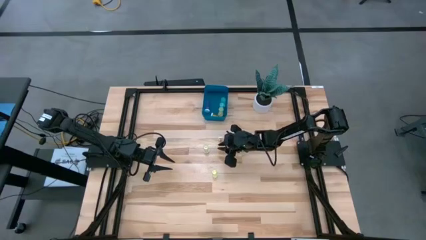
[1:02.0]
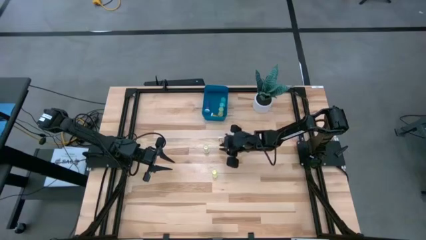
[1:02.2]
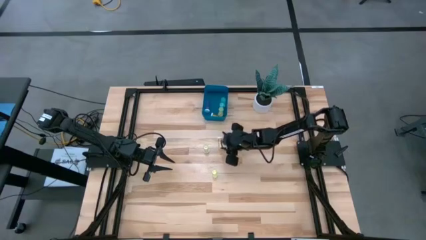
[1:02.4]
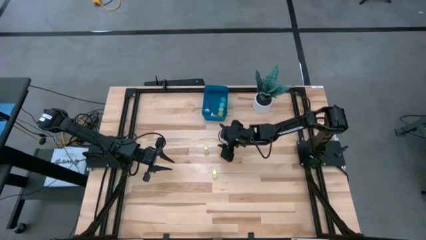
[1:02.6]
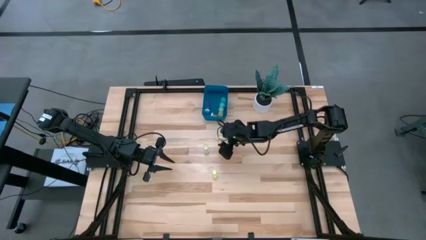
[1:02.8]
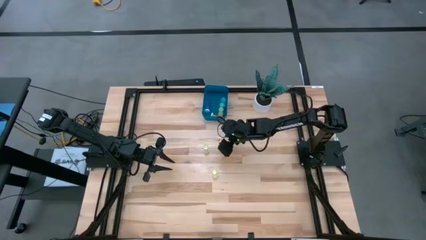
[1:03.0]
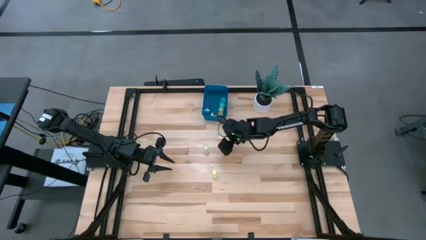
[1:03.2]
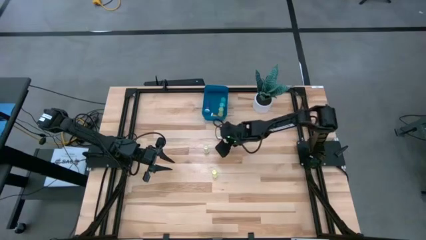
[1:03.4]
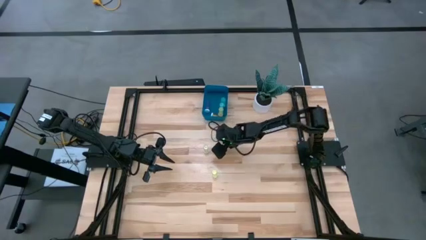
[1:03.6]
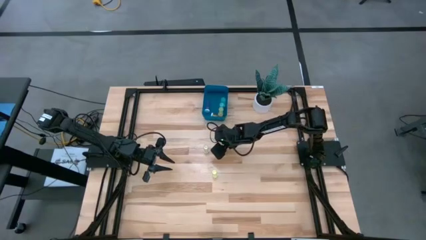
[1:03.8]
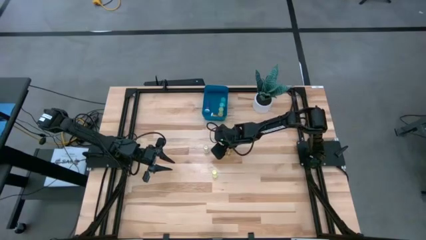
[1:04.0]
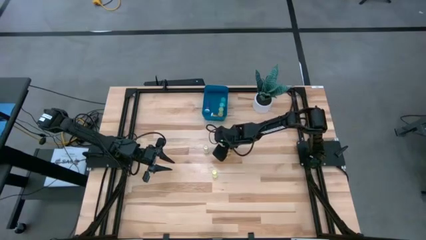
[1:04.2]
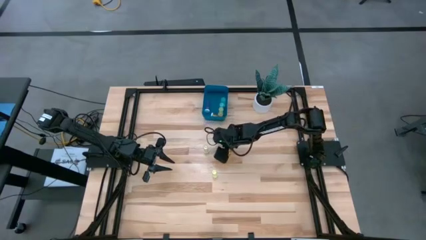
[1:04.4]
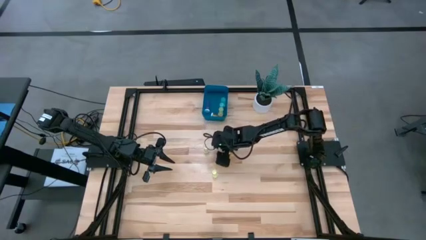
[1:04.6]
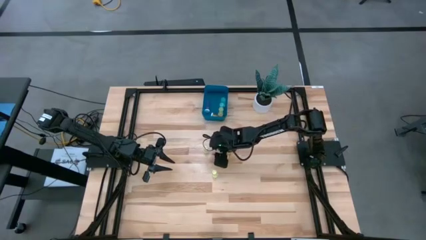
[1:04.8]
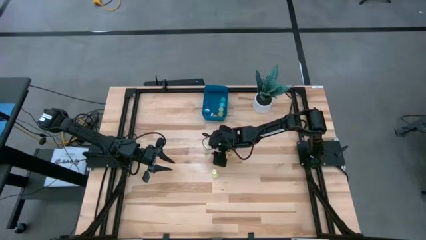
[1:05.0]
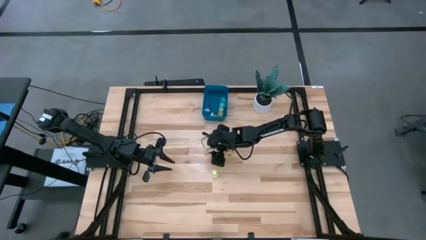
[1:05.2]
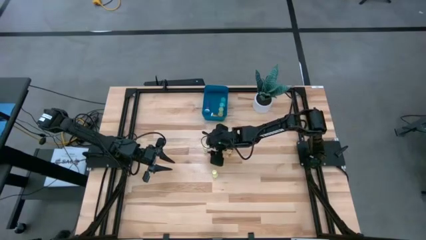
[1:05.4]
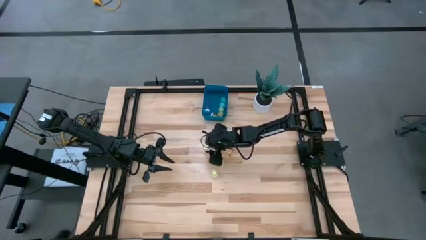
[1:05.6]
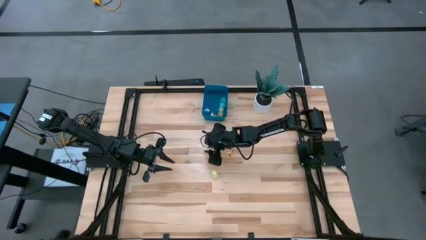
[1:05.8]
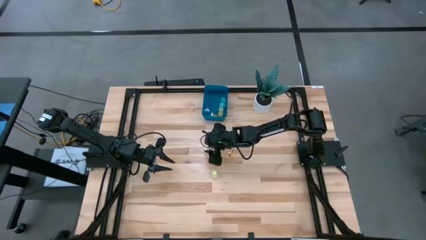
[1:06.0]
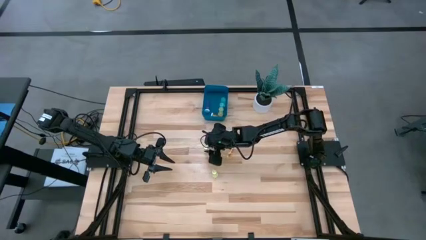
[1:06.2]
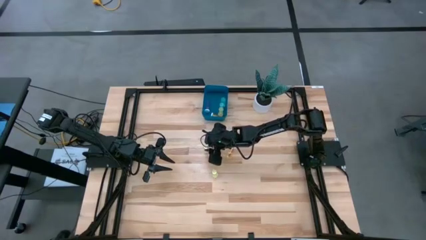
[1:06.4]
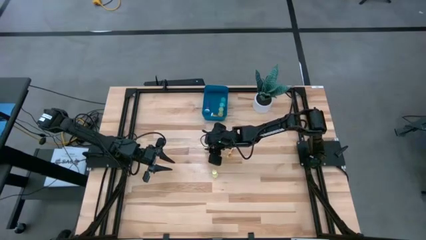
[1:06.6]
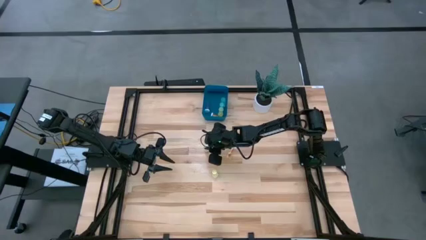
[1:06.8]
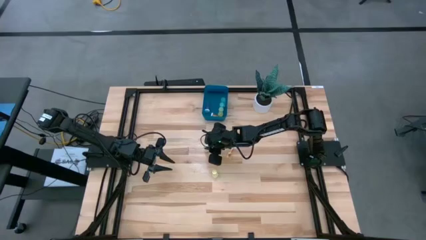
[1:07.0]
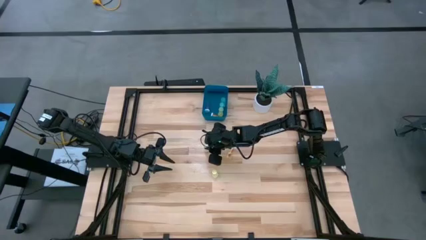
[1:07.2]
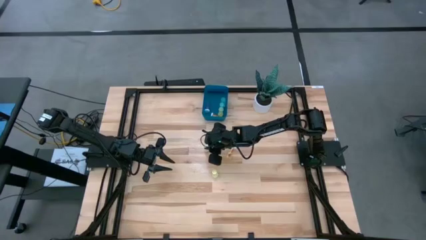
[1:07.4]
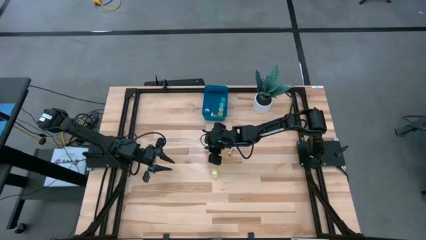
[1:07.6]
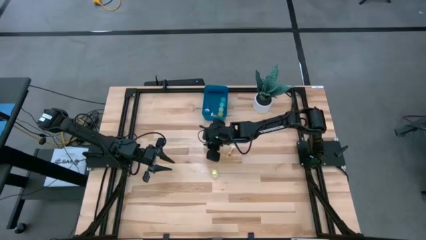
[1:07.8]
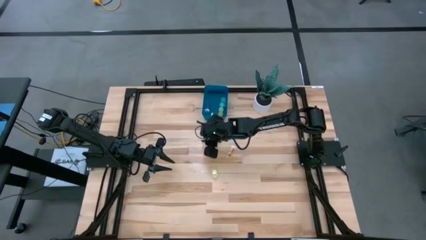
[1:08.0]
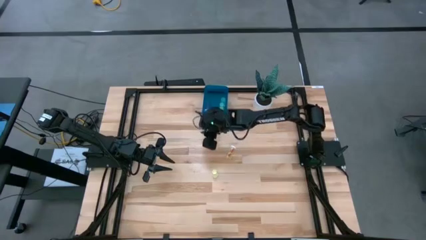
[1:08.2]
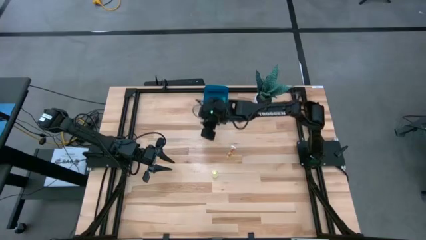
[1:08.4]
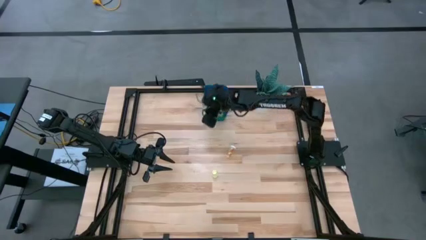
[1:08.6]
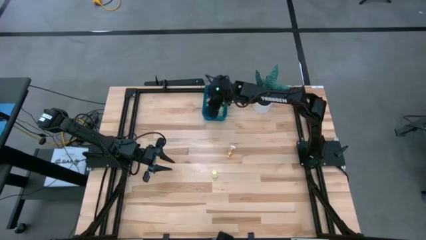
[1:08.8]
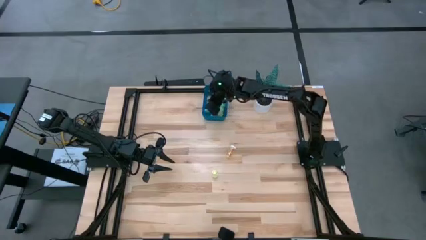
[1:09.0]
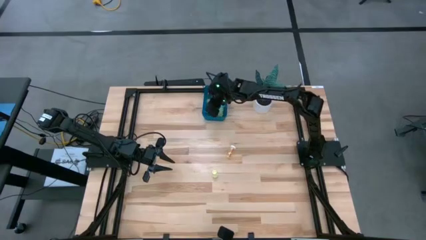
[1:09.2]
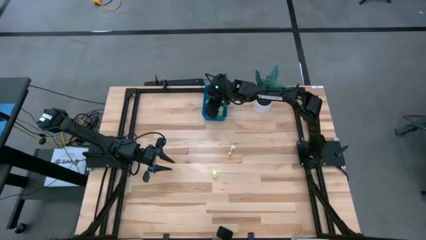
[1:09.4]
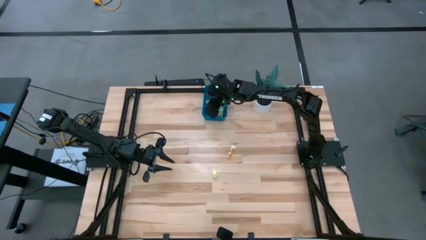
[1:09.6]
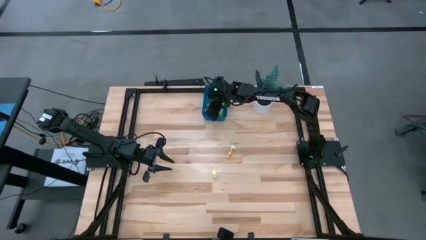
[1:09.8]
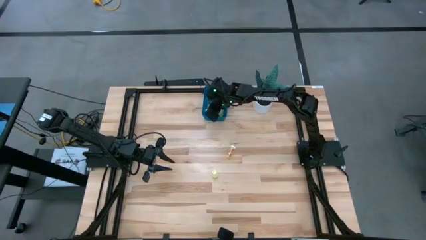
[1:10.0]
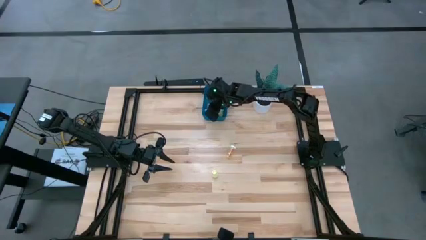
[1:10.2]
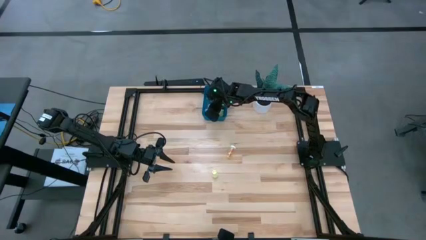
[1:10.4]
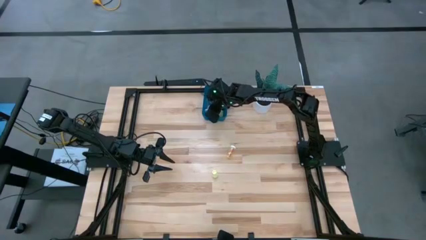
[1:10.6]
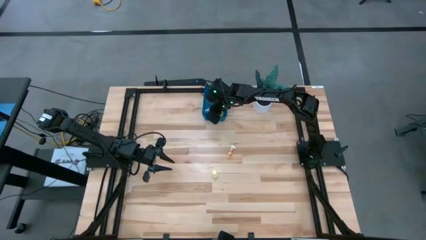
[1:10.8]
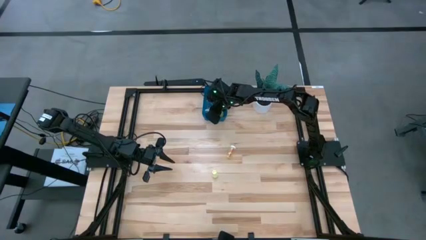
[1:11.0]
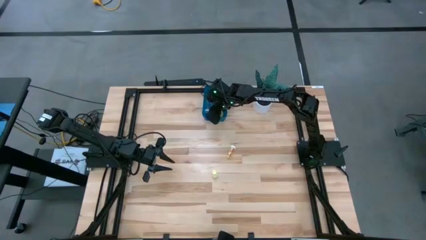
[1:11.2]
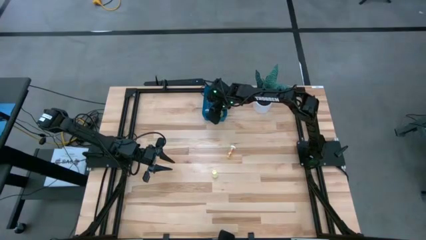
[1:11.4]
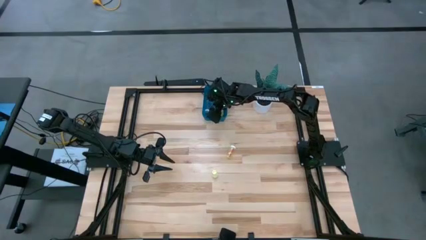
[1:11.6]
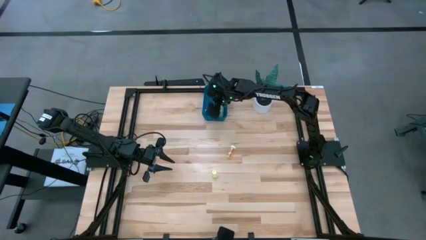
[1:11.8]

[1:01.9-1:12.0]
Task: Pick and place pill bottles into a basket
Put the left yellow pill bottle into the blue container

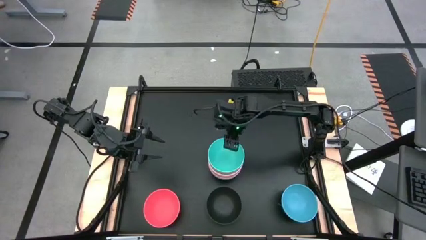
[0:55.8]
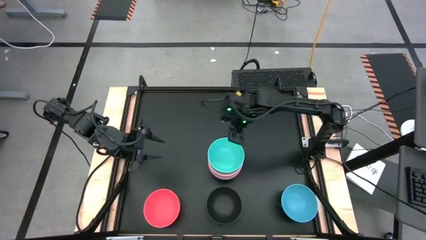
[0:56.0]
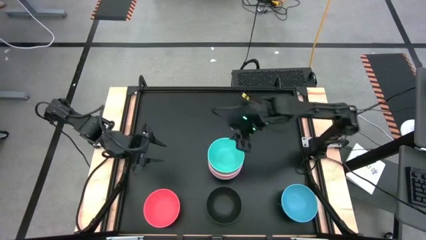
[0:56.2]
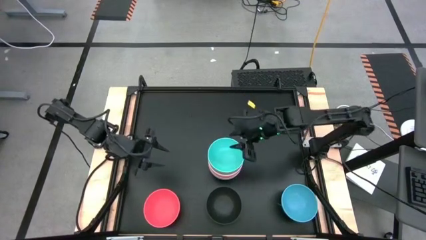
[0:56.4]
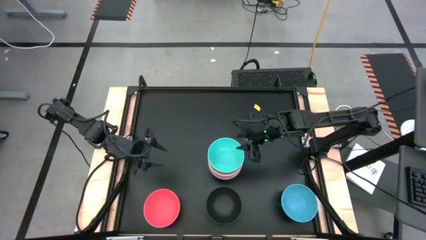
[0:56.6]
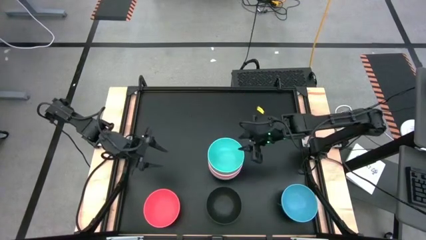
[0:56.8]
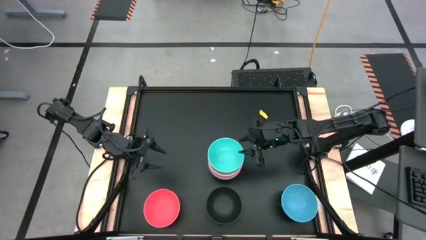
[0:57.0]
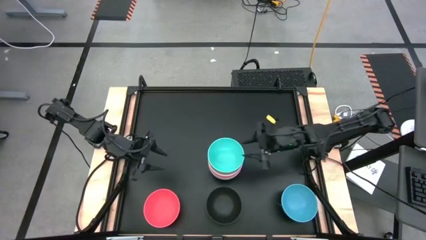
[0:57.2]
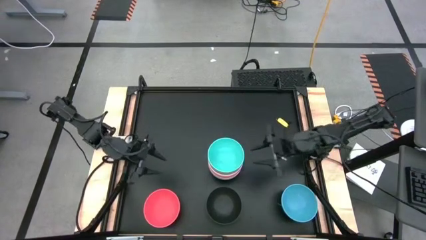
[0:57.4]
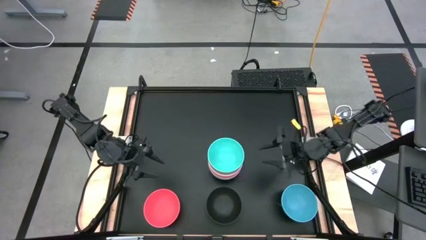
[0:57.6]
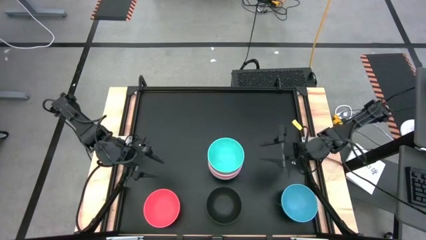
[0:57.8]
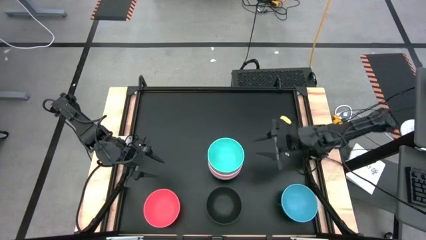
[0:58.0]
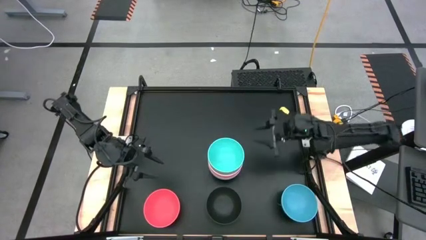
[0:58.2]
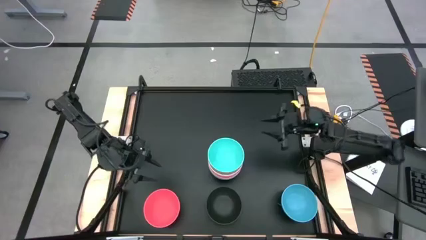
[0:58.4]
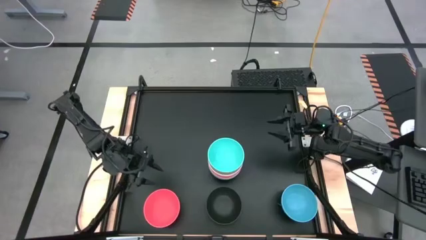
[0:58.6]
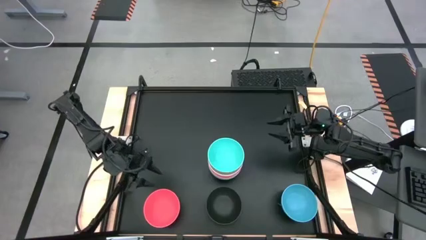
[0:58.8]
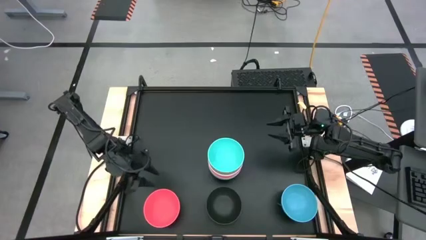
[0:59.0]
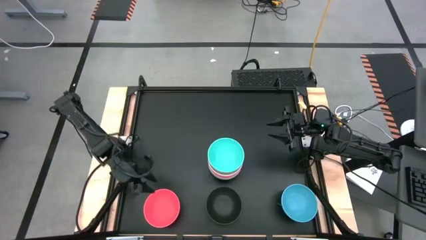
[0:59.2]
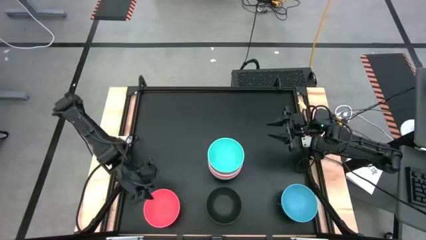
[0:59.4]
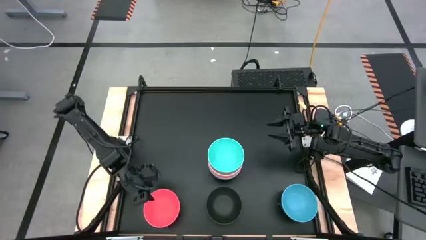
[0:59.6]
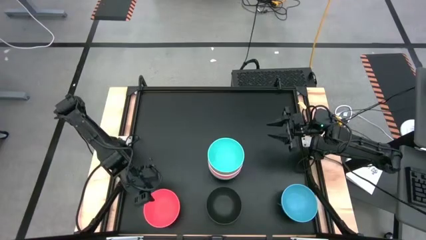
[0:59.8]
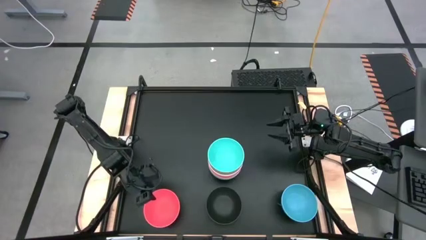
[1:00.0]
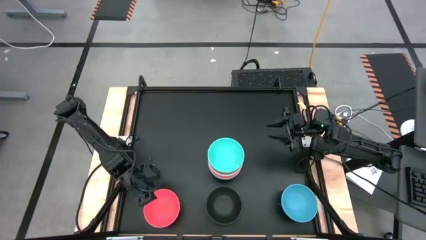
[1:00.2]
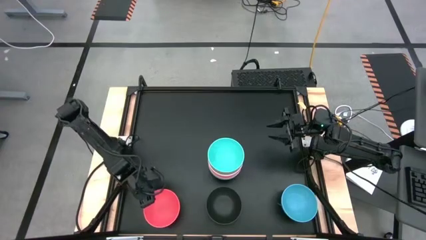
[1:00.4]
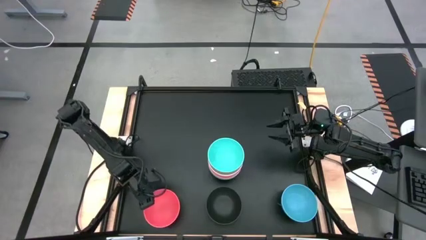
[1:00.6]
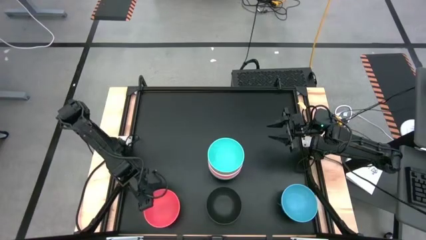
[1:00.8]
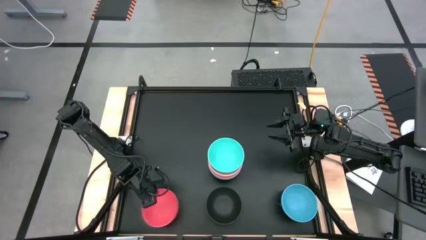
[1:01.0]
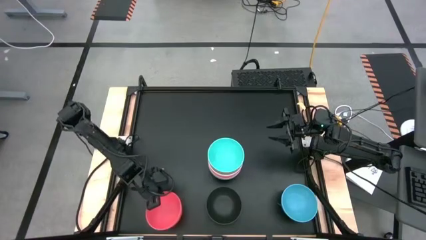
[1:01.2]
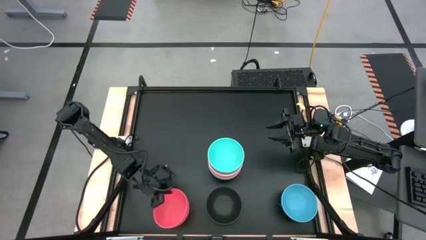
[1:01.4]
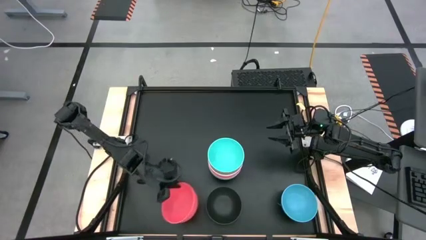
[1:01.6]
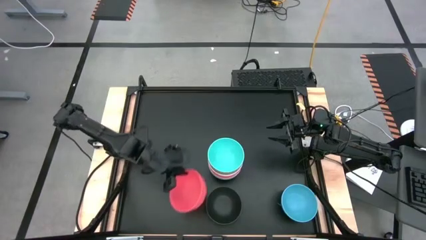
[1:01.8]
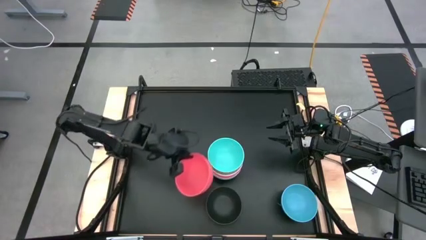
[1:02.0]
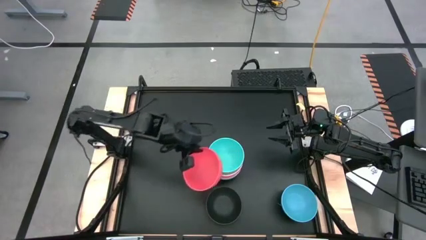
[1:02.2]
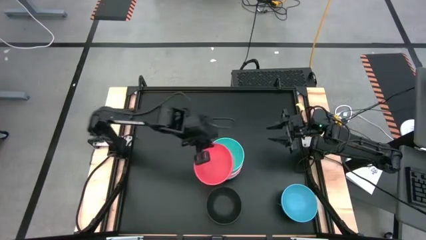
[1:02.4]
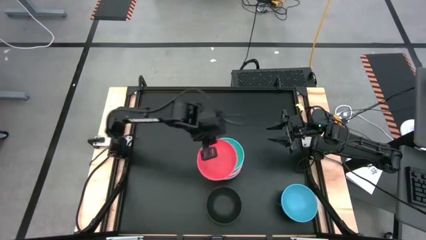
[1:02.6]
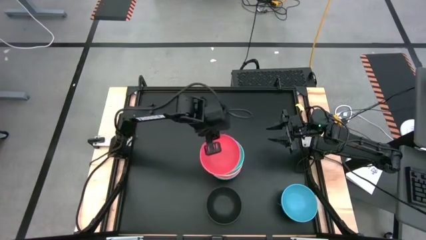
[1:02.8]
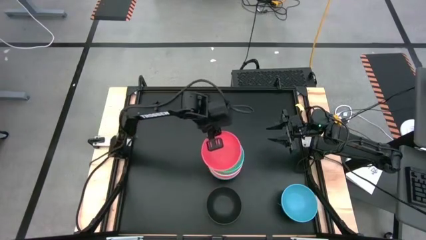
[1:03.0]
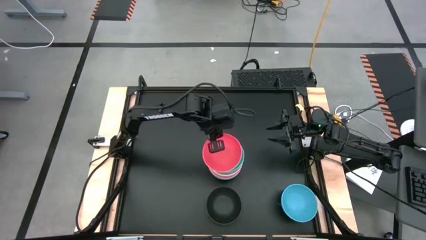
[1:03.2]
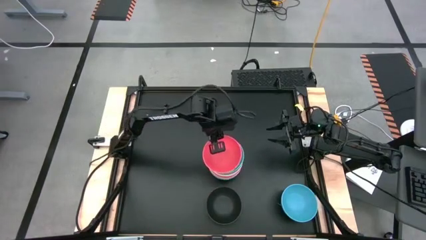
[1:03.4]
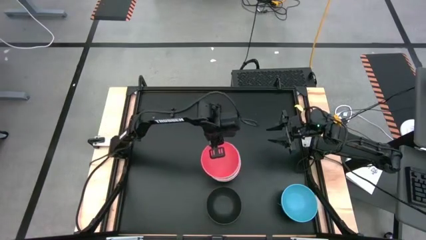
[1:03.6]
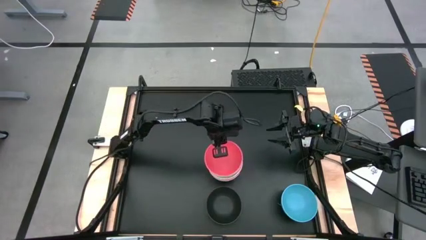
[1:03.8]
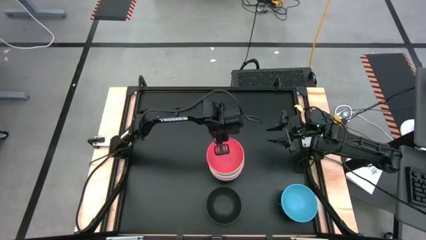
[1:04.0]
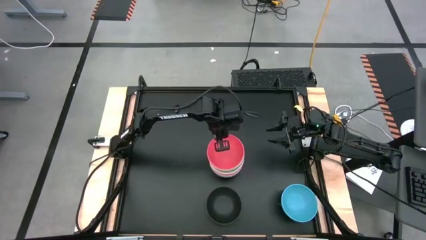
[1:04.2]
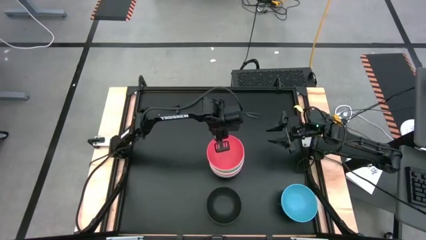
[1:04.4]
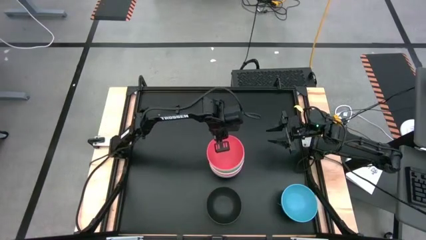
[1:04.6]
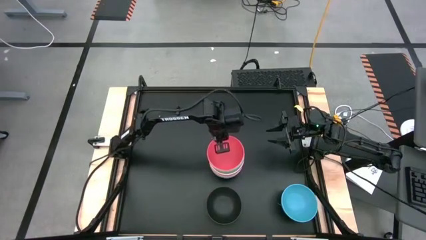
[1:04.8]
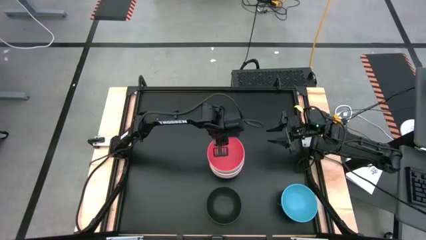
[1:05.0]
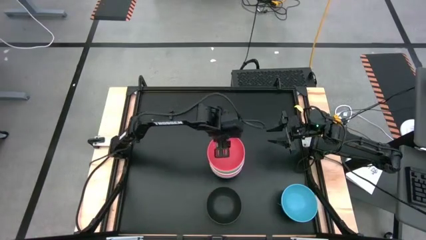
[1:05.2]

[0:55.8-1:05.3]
Task: Nest bowls inside each other
Stack the red bowl on top of the light blue bowl
